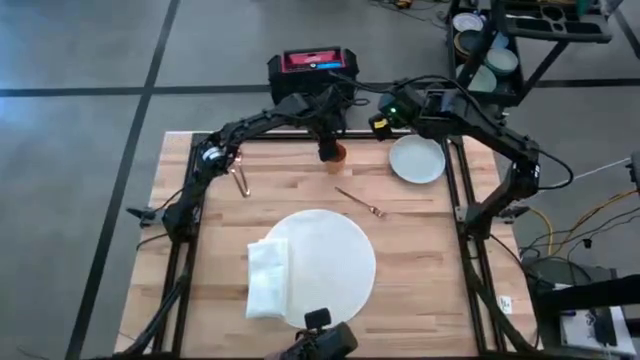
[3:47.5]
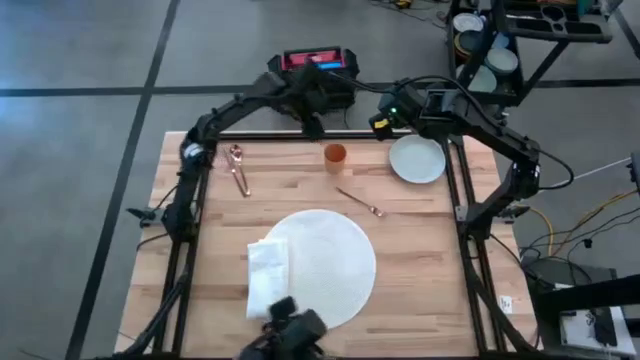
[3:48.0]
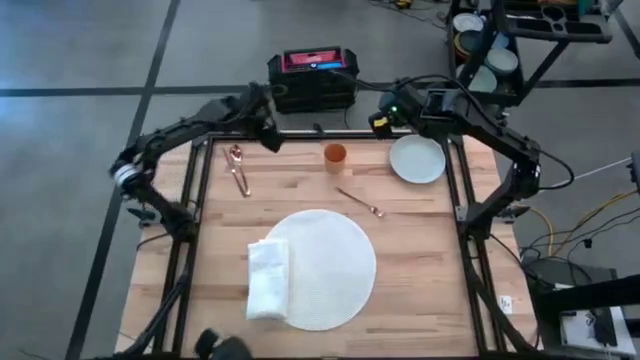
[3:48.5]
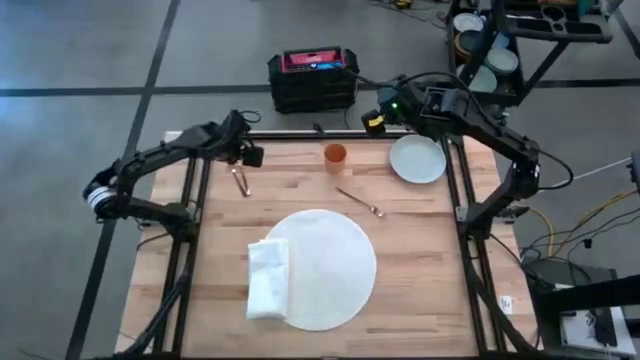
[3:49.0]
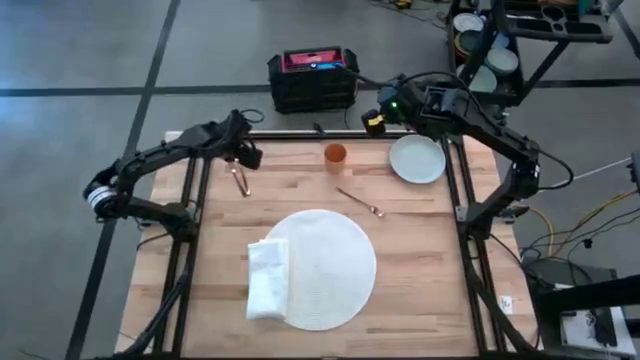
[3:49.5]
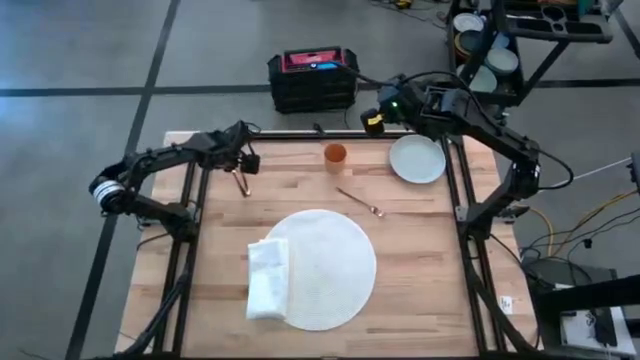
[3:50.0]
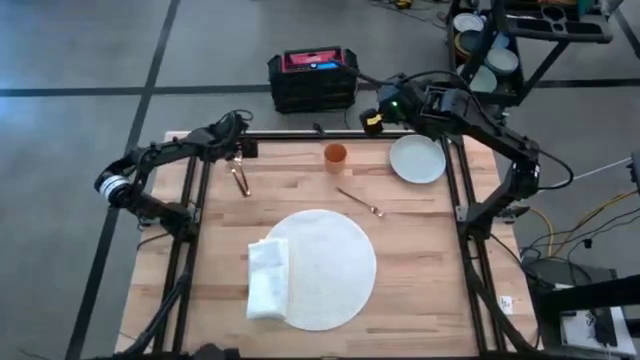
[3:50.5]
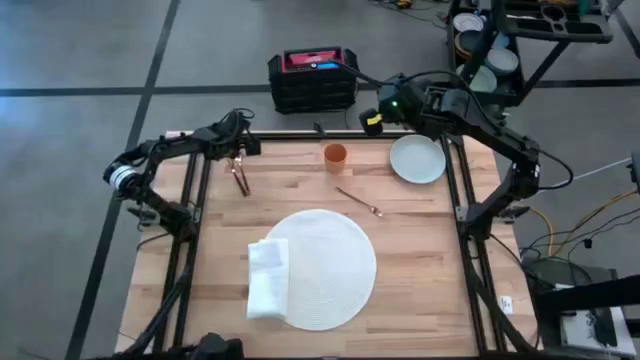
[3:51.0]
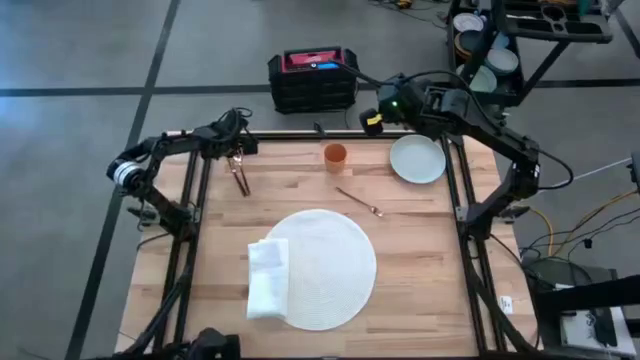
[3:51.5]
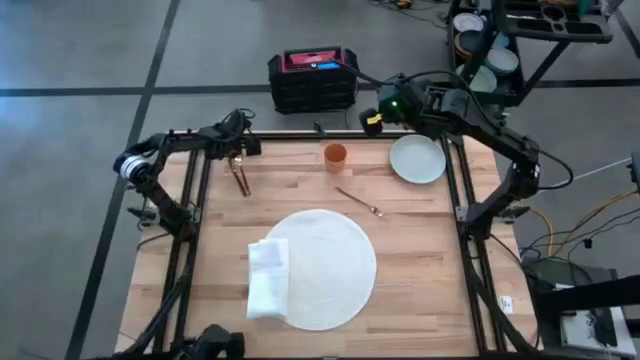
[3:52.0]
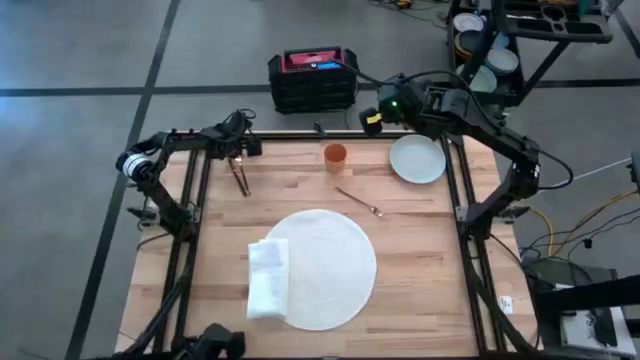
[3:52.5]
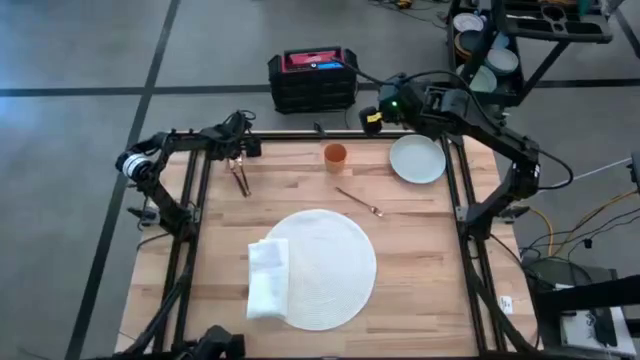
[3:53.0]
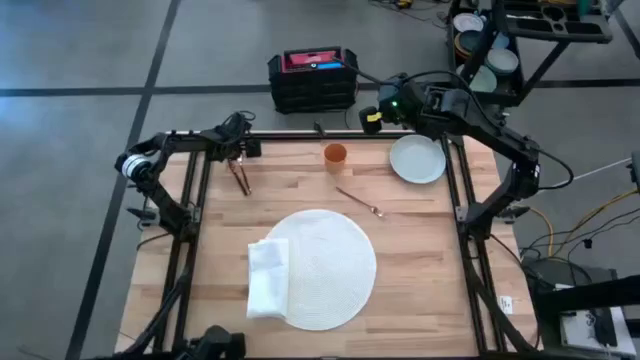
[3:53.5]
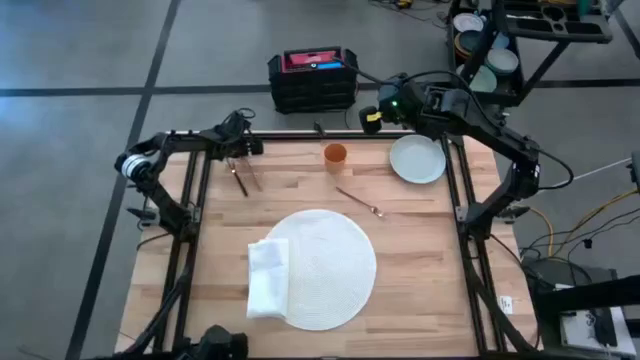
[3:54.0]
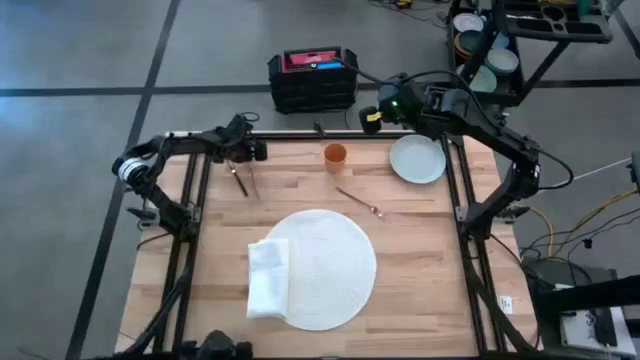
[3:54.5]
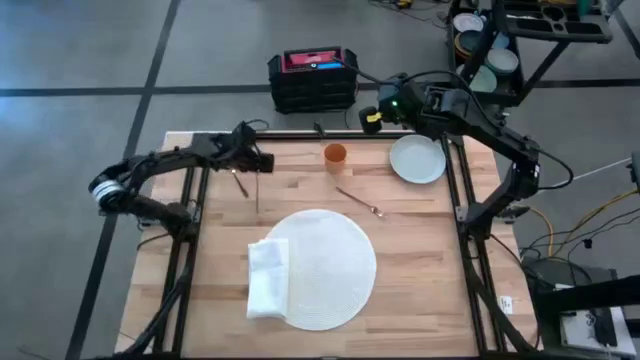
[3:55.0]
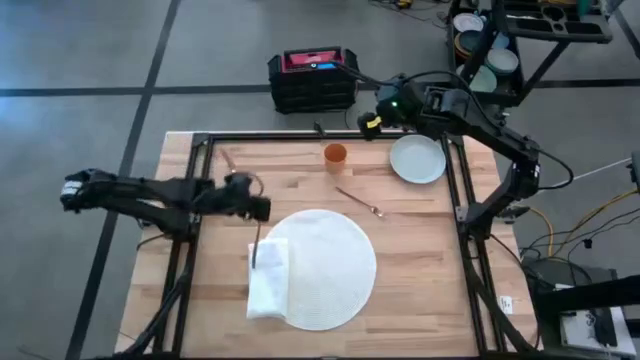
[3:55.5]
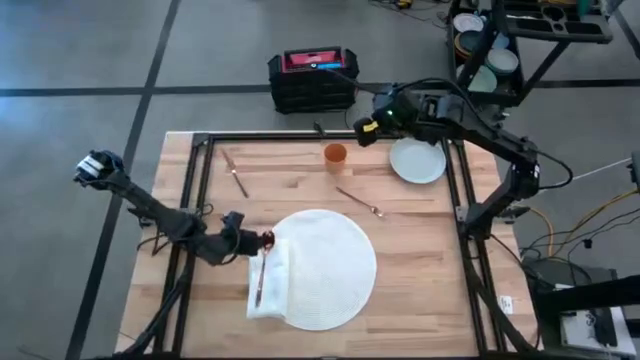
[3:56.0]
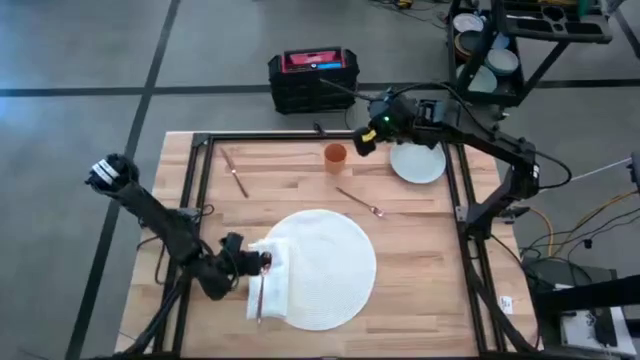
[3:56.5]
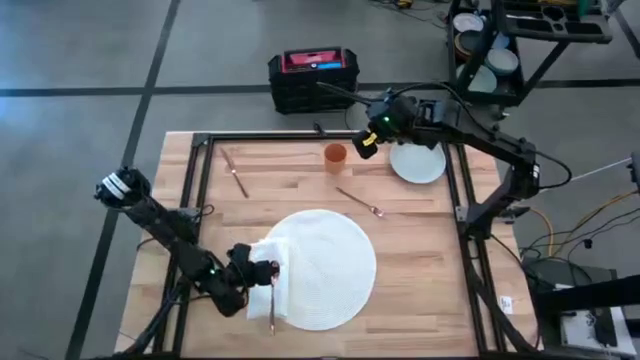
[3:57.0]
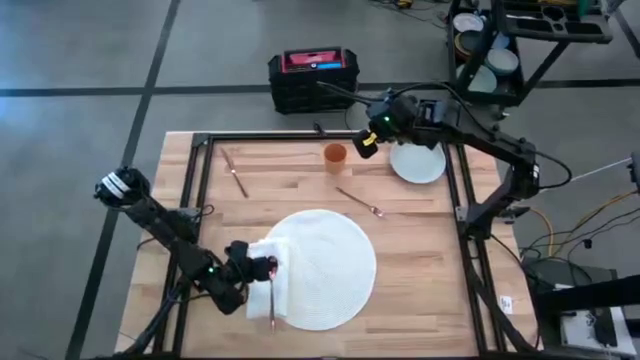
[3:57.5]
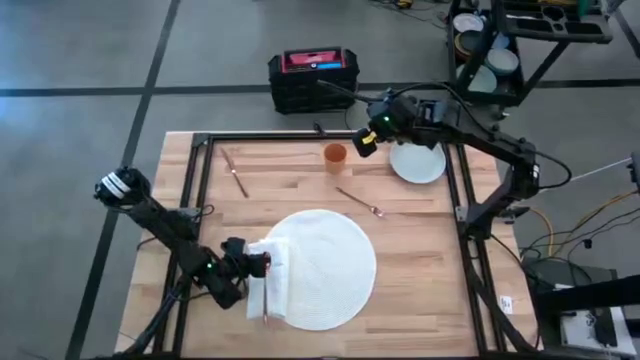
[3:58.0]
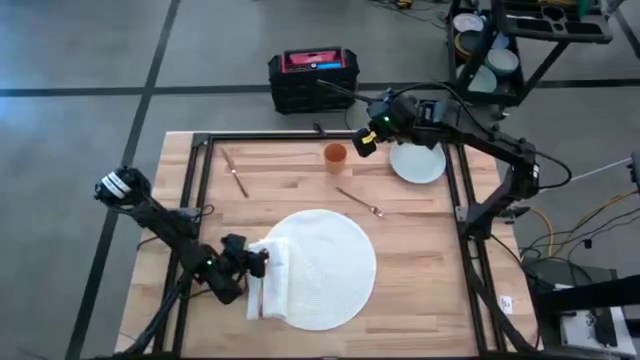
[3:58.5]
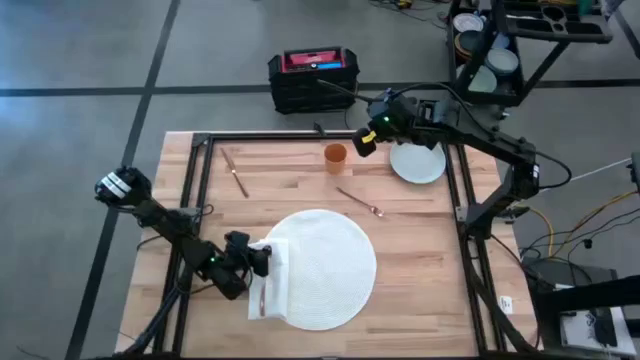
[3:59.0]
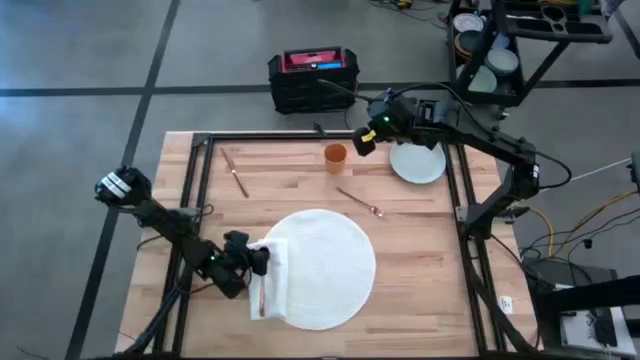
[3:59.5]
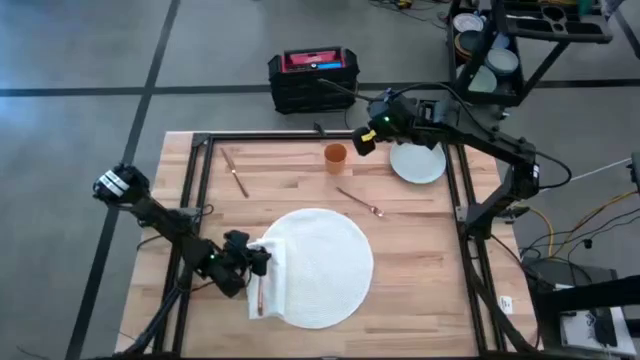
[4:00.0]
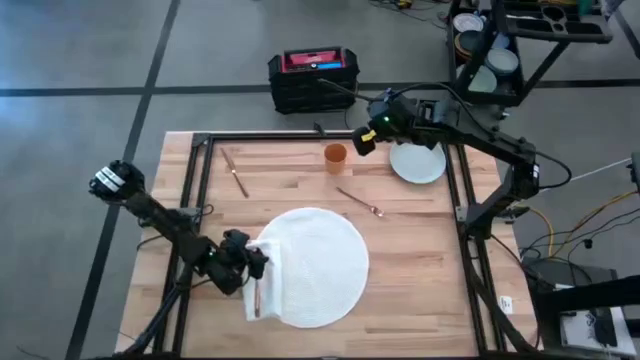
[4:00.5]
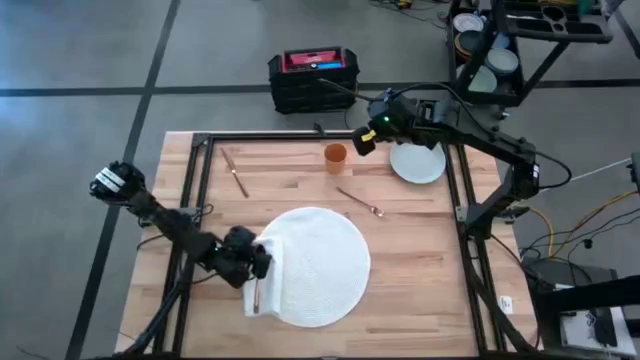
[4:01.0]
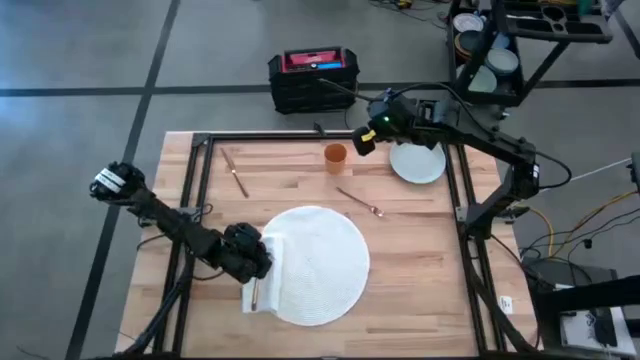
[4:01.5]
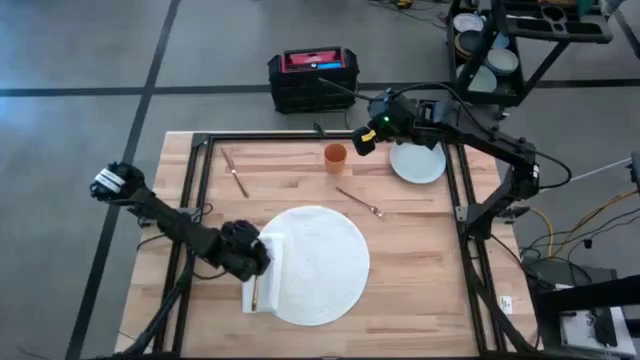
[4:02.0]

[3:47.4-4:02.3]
Task: Set table place
Put the gold spoon on the white napkin

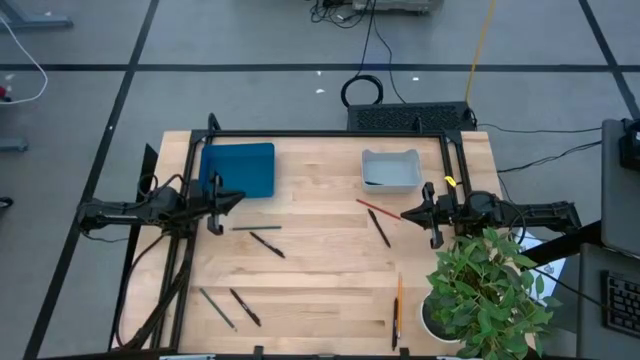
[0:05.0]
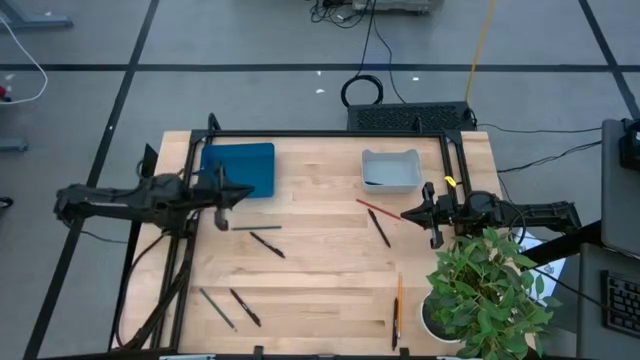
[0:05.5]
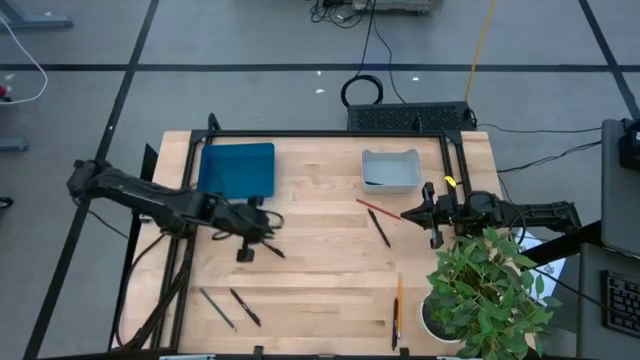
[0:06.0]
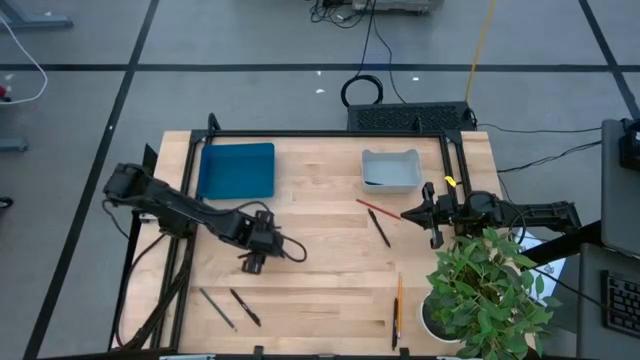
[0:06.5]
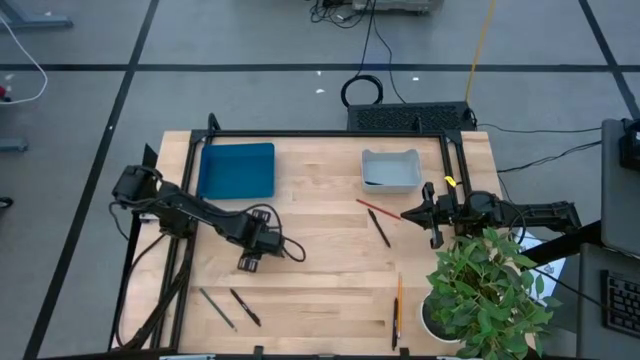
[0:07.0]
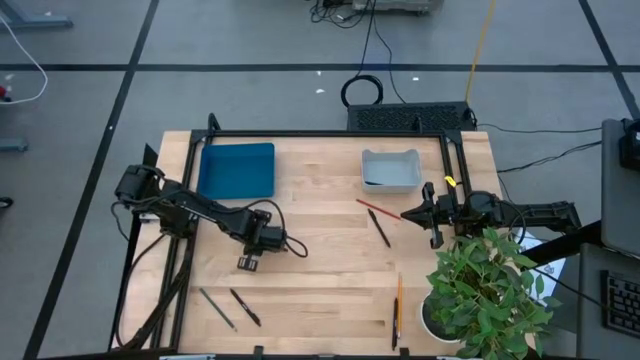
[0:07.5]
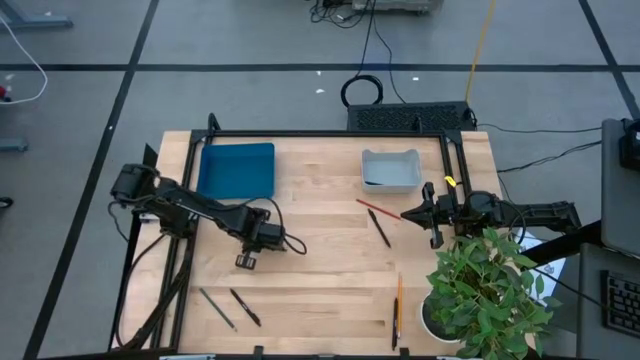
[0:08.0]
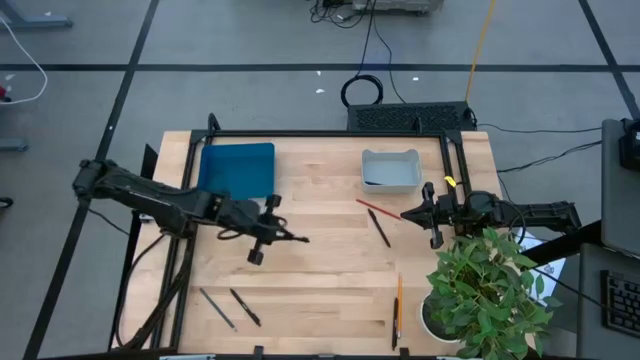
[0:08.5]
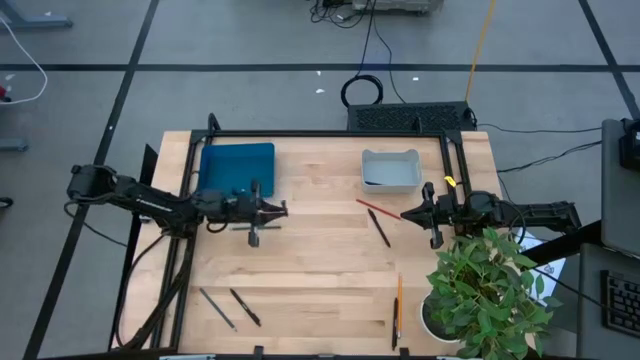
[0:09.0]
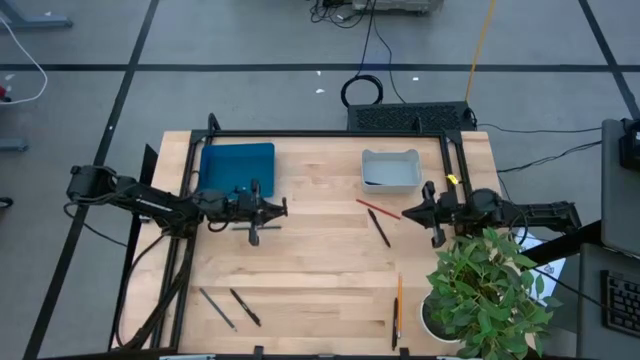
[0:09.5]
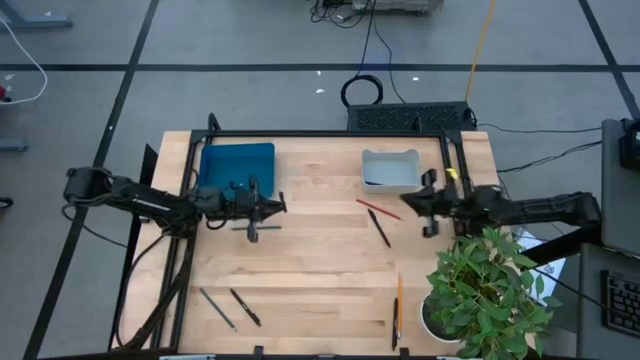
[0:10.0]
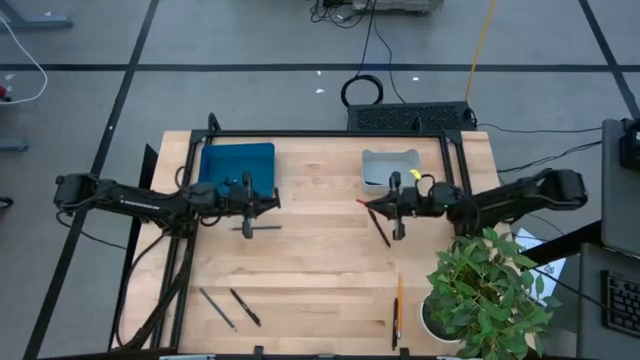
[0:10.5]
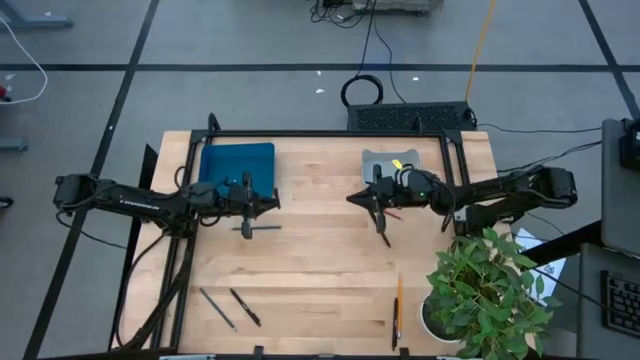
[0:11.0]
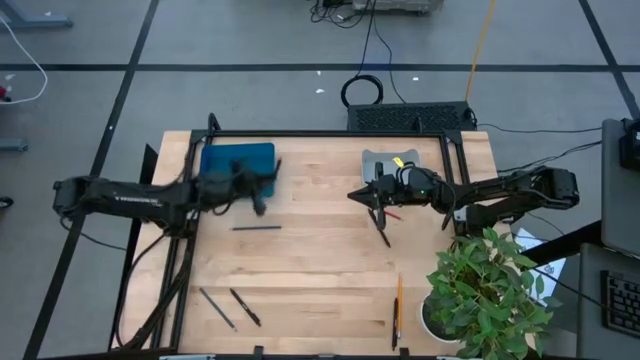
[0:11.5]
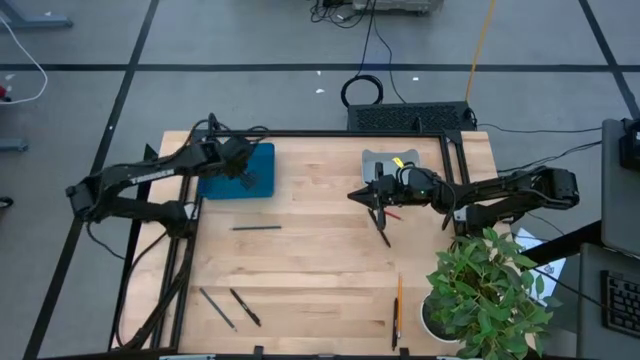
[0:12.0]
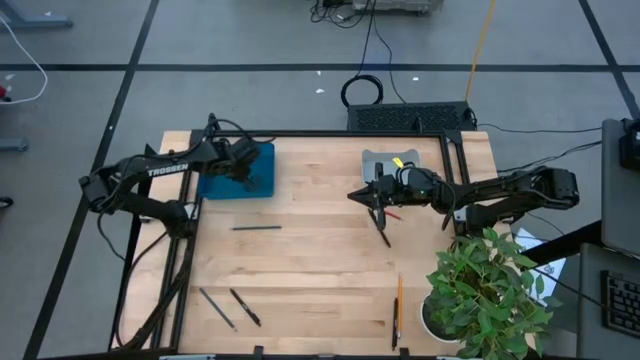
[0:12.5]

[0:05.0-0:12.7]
Task: Sort pens & pencils
Put the black pen into the blue bin
